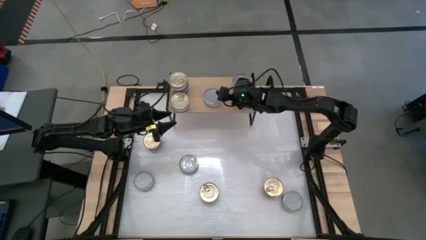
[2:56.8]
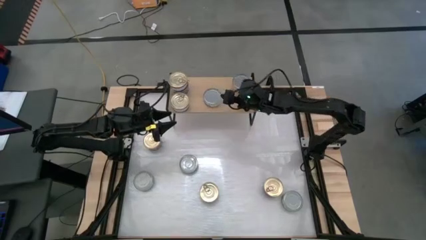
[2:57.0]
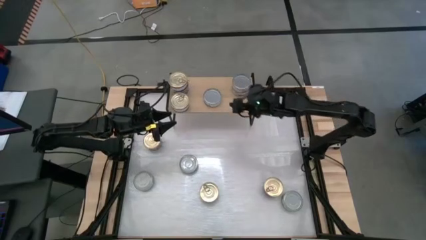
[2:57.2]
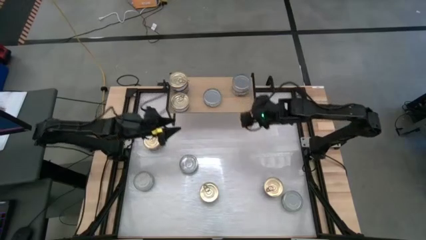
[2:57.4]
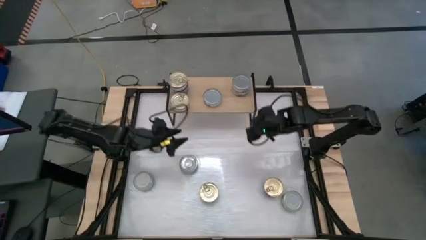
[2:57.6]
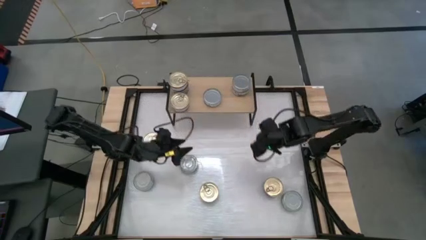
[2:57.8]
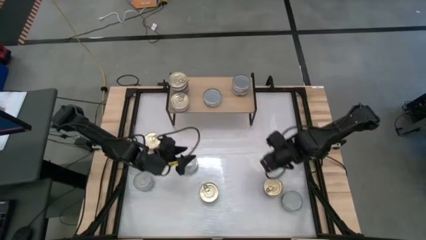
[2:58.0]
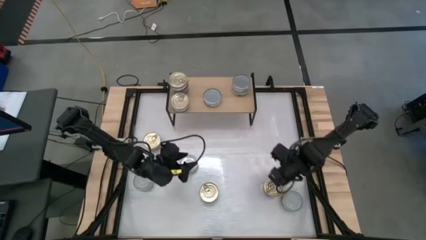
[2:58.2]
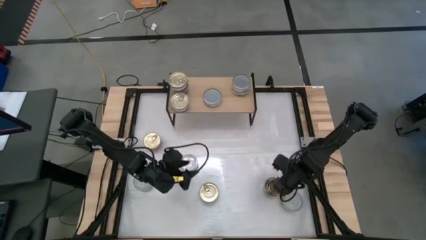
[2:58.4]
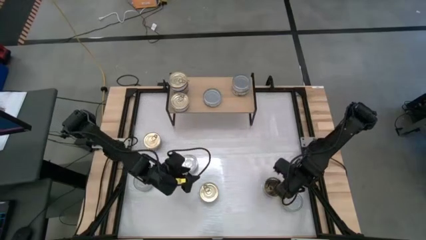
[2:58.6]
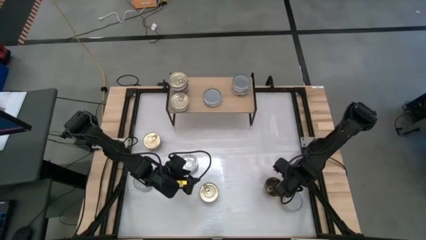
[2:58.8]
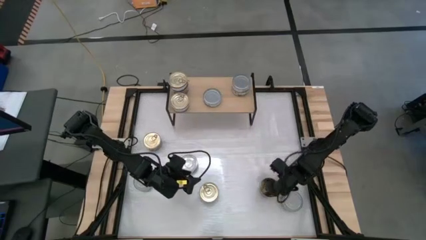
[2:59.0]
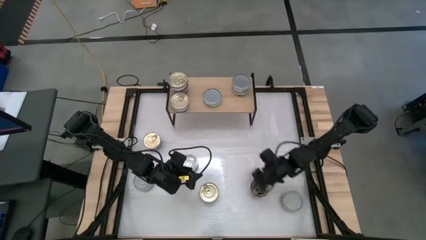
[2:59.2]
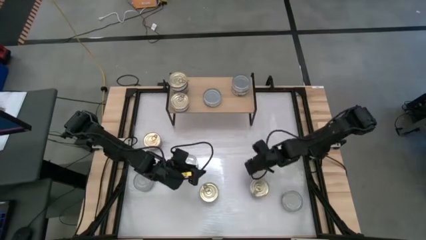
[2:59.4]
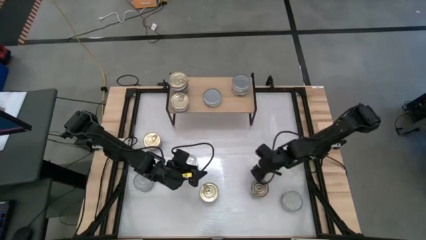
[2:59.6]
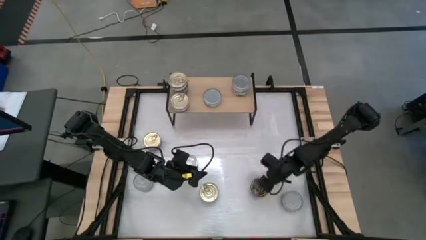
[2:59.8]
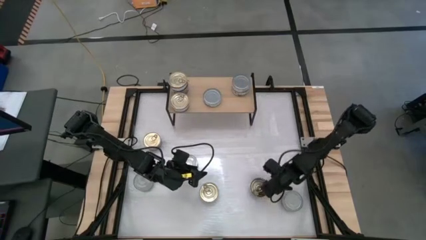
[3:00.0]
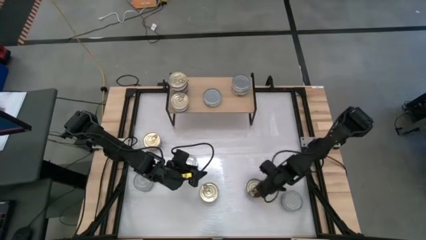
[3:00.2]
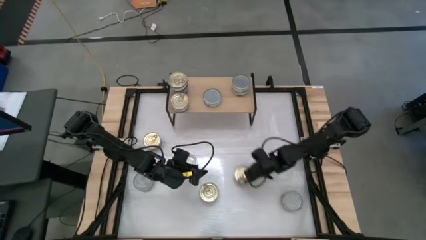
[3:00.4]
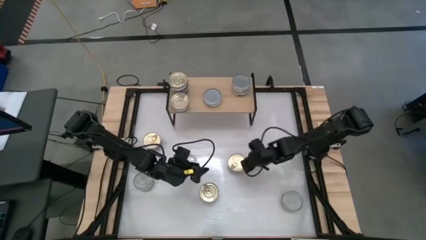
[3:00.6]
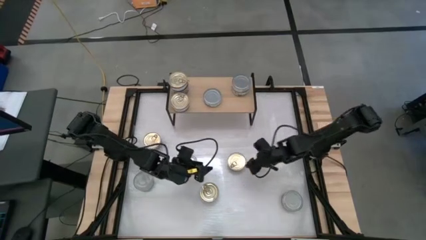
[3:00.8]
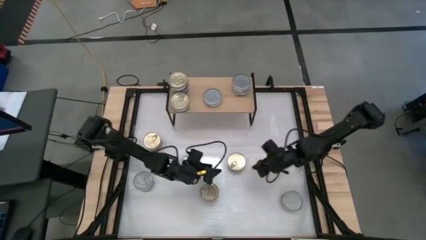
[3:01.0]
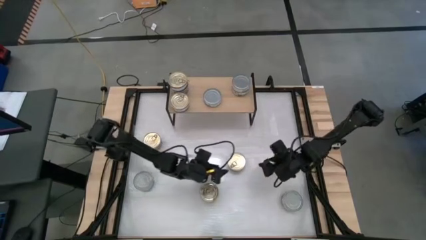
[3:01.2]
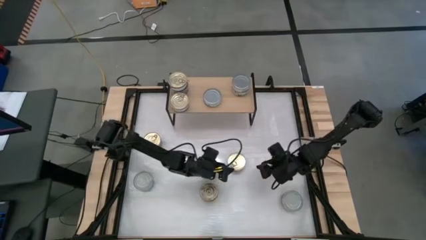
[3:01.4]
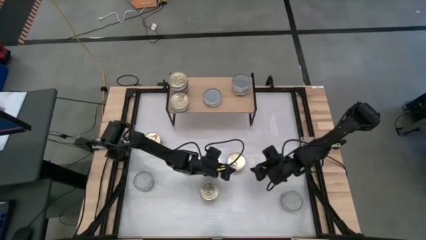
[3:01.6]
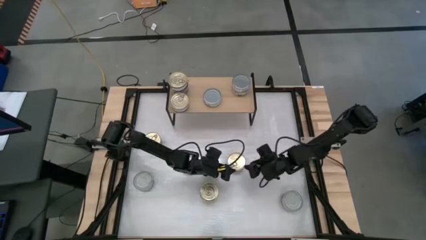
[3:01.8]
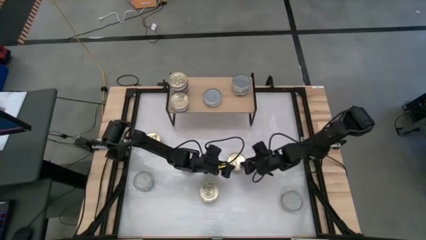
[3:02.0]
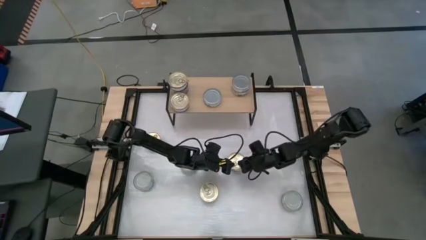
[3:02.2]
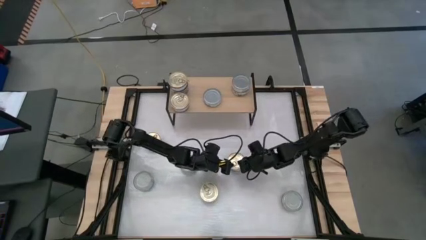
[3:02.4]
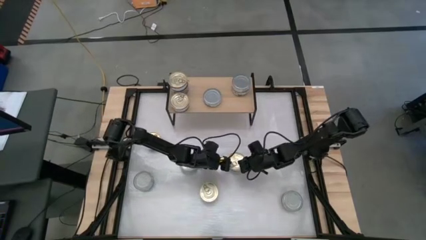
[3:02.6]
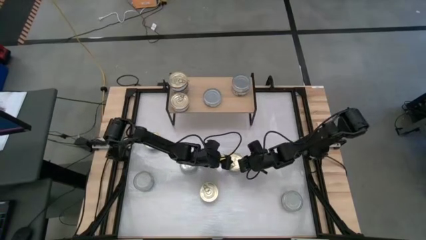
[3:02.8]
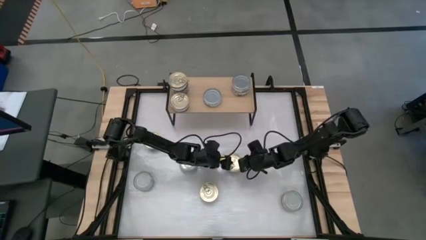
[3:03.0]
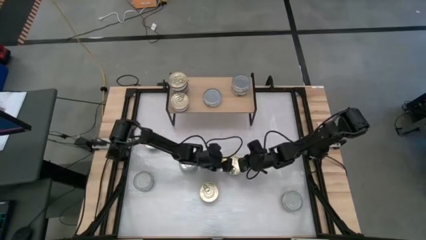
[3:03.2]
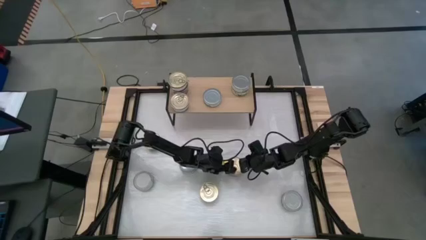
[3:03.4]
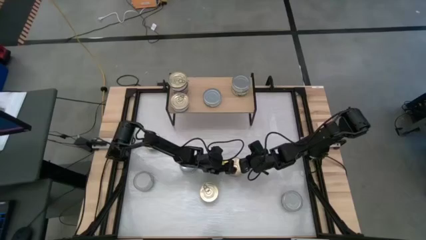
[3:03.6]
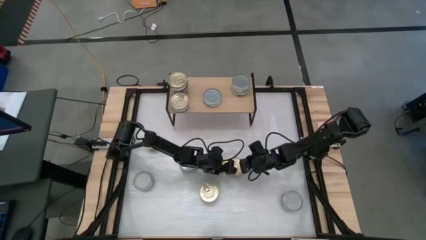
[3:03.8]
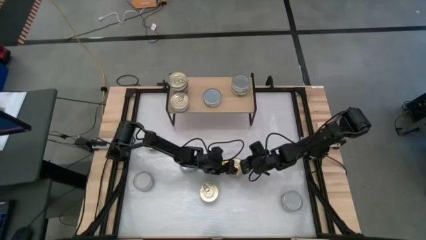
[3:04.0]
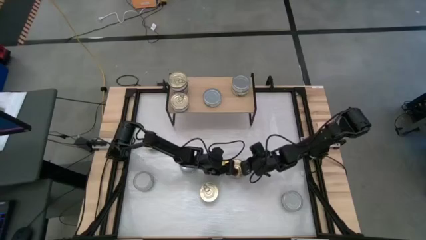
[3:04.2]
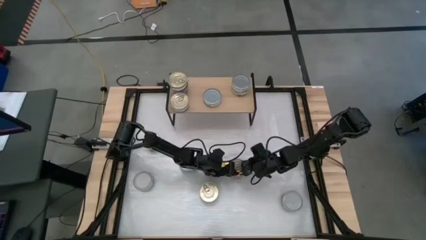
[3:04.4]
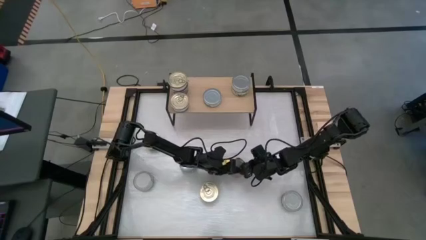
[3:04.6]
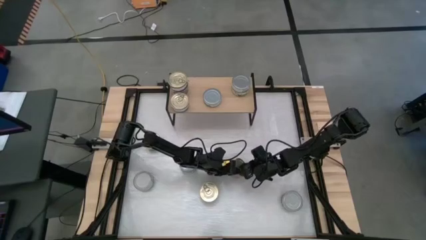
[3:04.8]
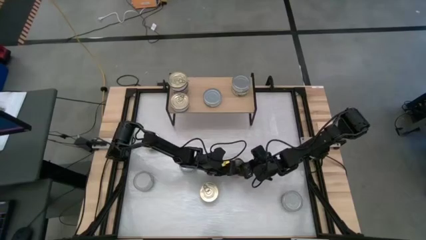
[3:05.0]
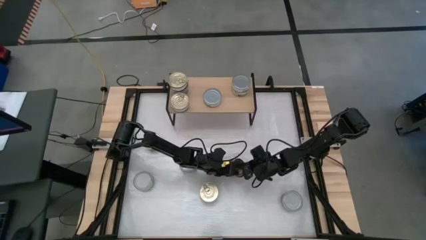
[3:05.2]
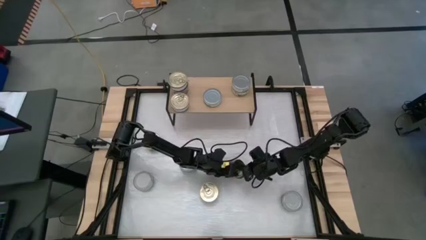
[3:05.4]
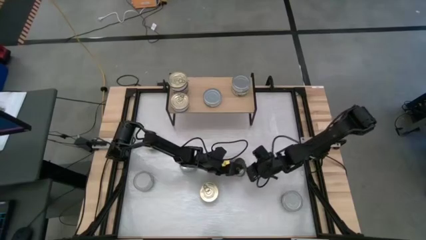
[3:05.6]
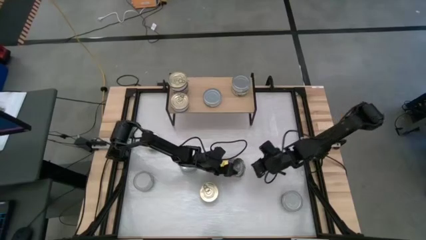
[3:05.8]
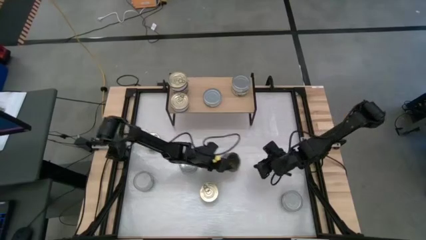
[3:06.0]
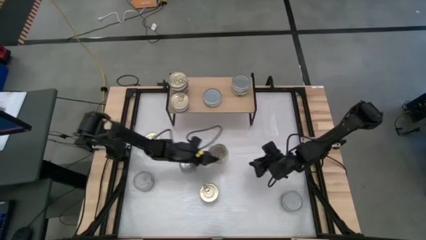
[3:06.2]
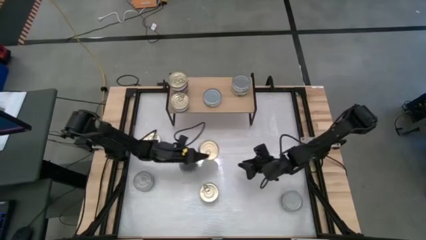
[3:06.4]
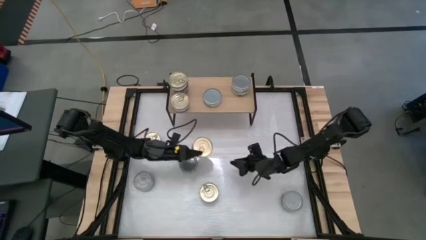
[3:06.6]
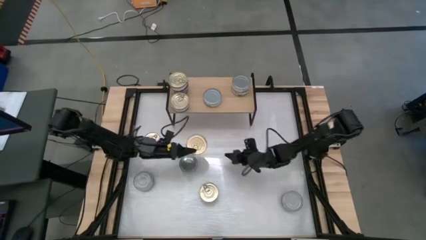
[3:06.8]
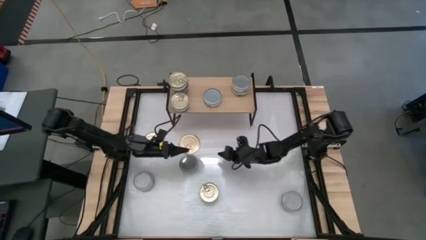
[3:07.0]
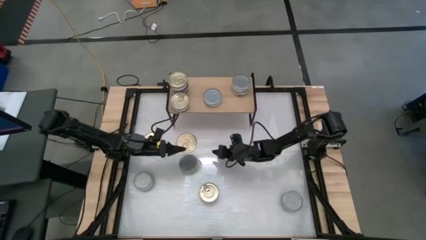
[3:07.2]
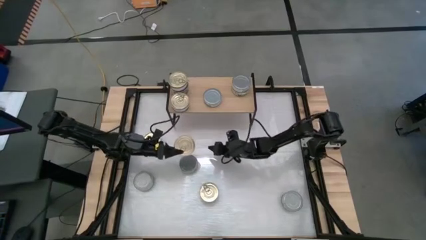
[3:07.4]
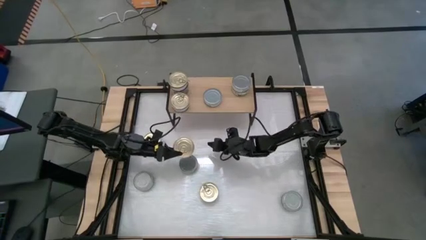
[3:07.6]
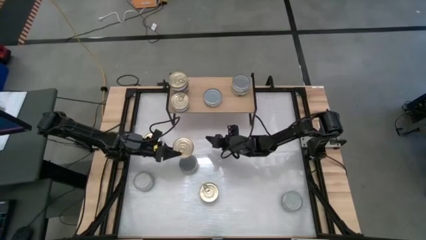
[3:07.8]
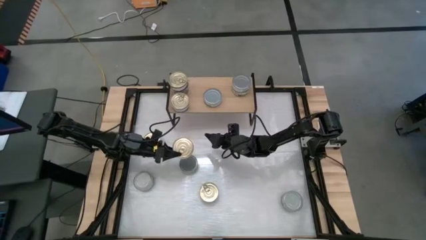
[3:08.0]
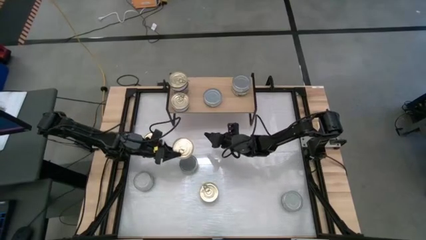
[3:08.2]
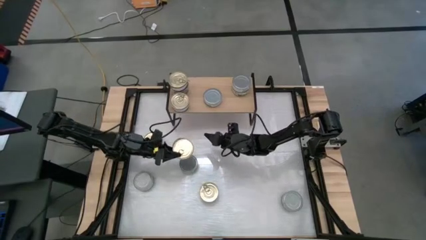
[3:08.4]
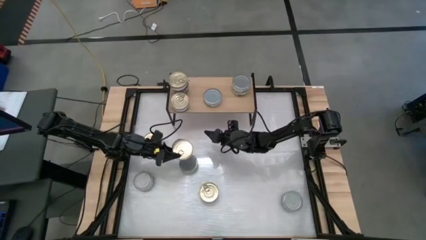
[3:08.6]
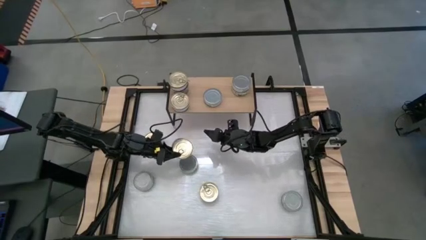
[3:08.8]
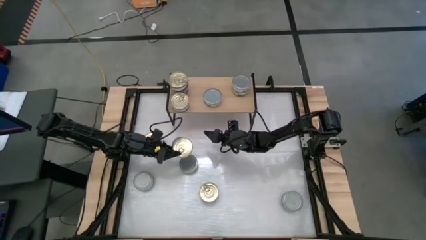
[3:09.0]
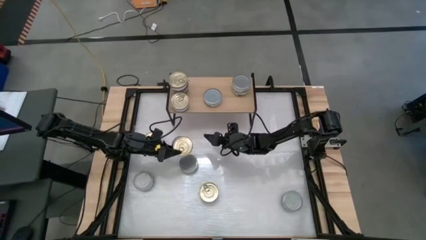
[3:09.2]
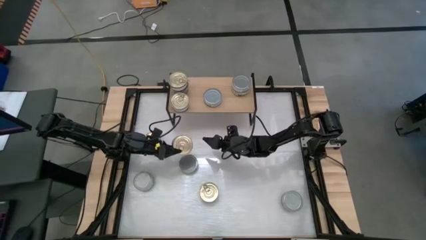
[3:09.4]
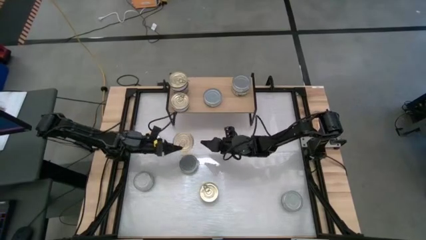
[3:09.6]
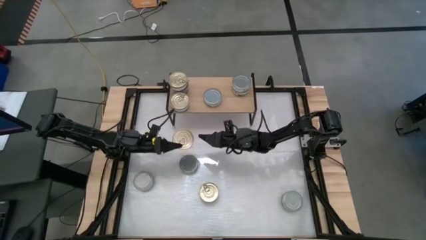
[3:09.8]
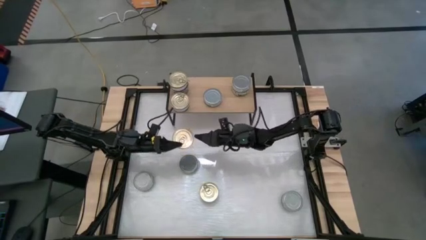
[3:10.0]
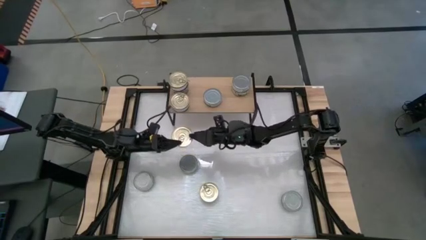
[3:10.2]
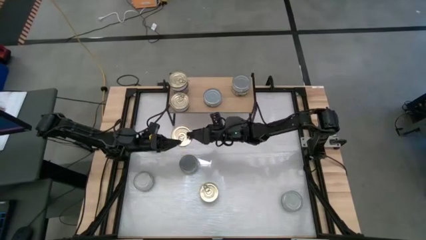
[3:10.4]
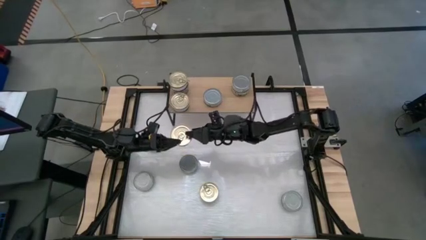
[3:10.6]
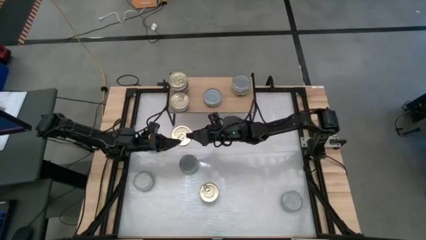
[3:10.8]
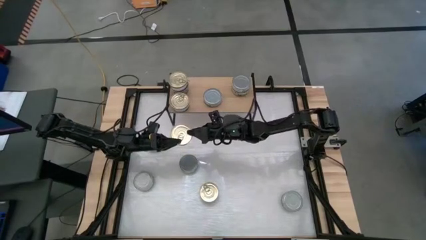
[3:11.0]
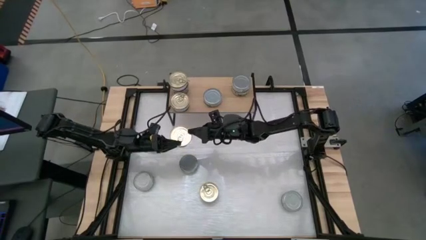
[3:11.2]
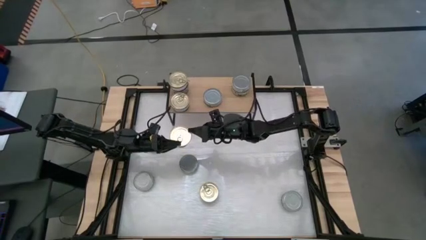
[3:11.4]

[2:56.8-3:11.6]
Task: Stack canned seafood by type on shelf
Stack the blue pink tuna can on top of the other blue pink tuna can on the shelf

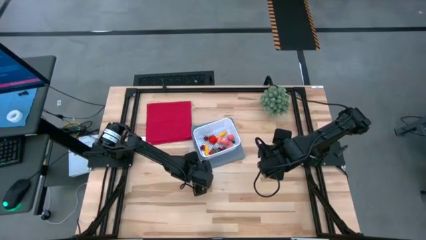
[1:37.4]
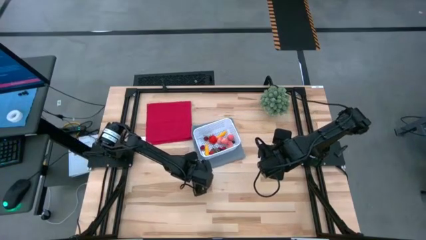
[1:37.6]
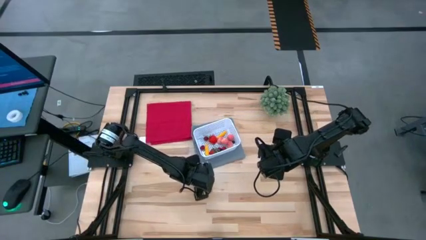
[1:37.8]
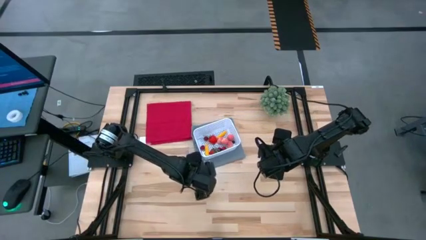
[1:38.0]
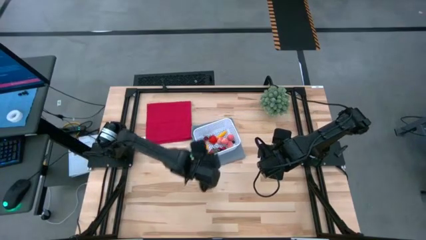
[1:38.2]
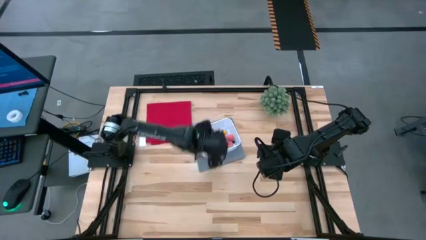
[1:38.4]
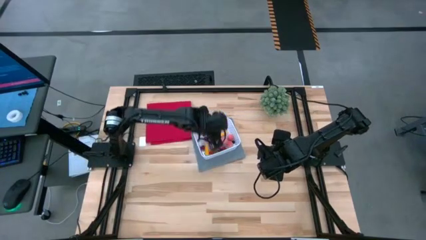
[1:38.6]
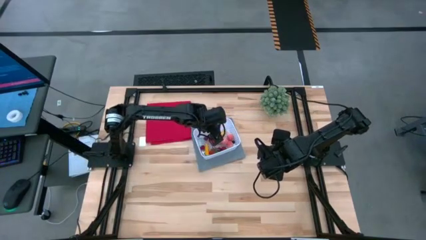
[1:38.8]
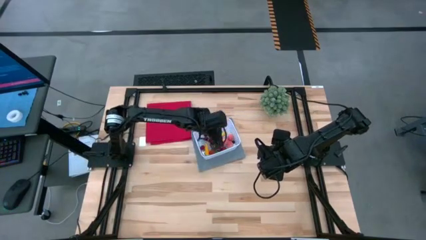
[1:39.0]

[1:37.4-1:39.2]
Task: Pick and placing Produce into tupperware
Put the grape into the white basket
